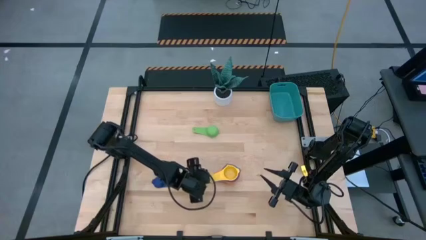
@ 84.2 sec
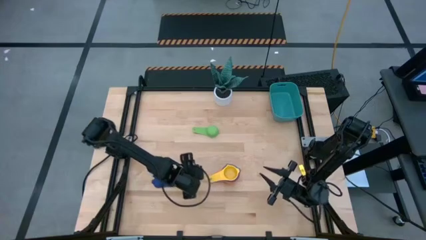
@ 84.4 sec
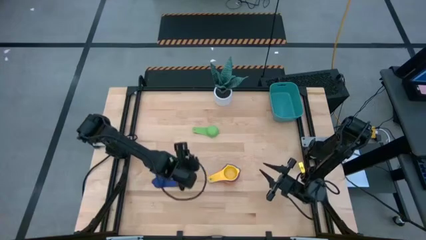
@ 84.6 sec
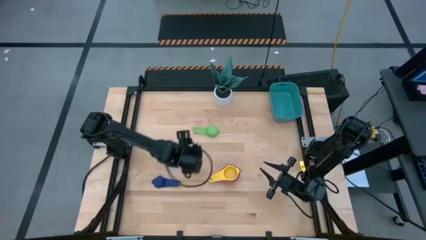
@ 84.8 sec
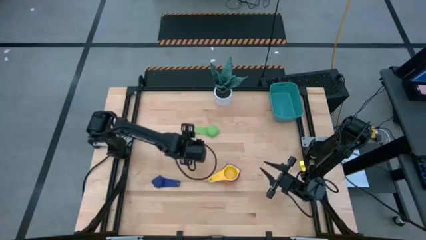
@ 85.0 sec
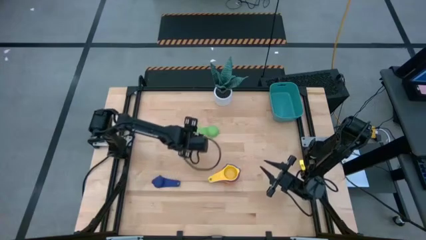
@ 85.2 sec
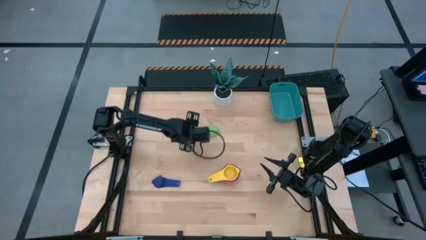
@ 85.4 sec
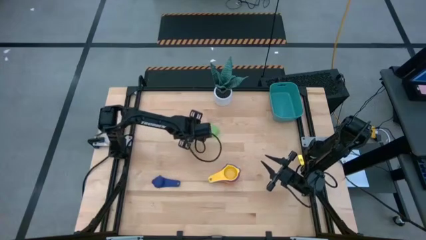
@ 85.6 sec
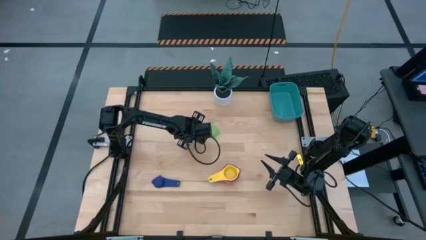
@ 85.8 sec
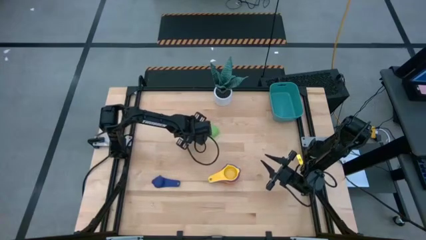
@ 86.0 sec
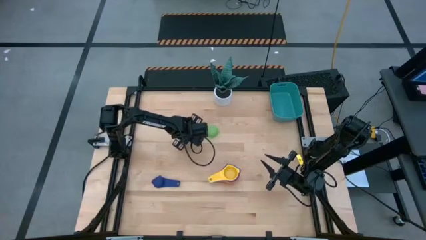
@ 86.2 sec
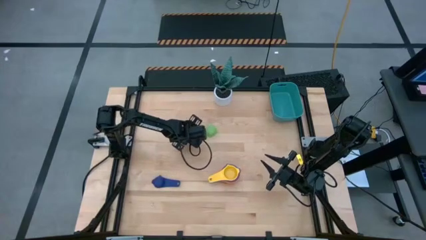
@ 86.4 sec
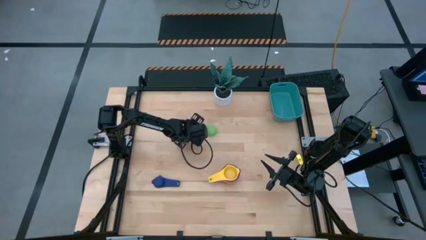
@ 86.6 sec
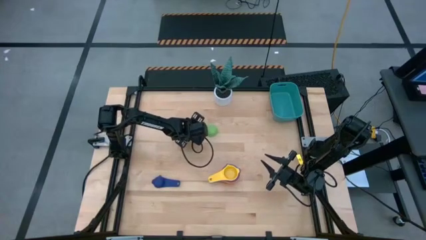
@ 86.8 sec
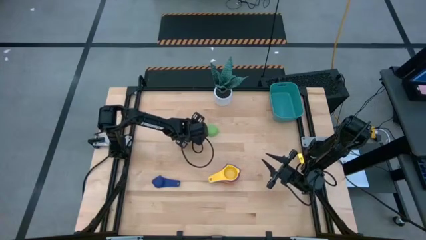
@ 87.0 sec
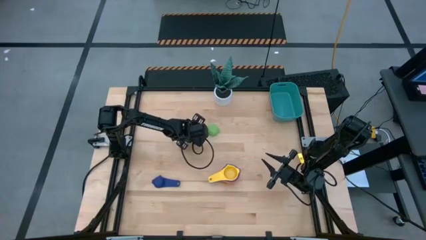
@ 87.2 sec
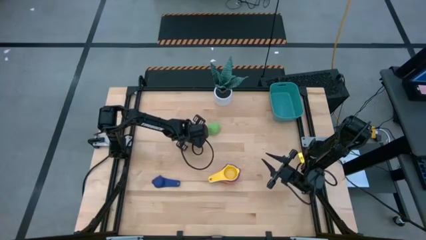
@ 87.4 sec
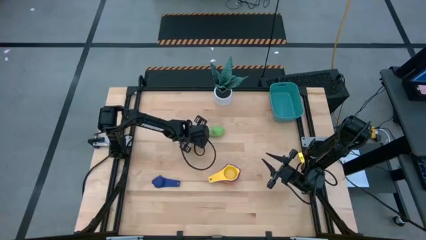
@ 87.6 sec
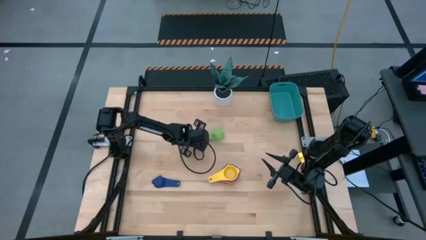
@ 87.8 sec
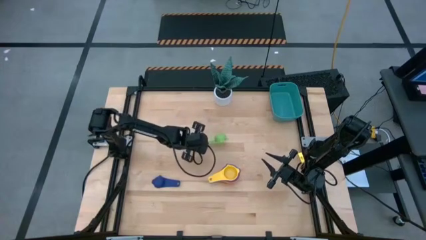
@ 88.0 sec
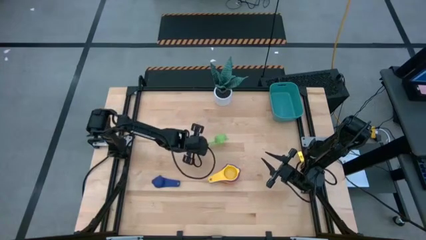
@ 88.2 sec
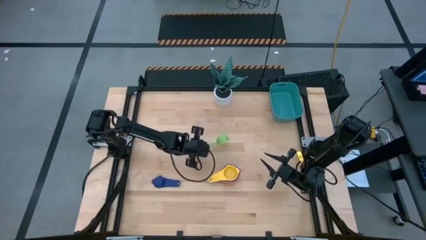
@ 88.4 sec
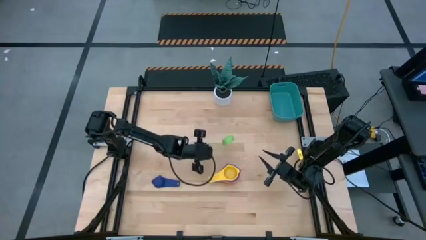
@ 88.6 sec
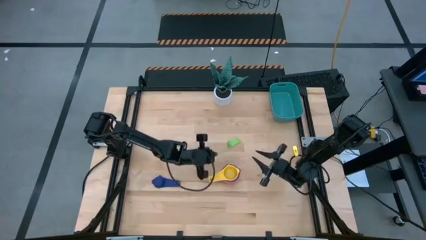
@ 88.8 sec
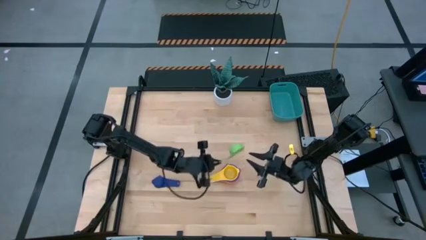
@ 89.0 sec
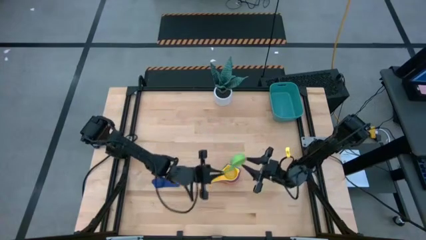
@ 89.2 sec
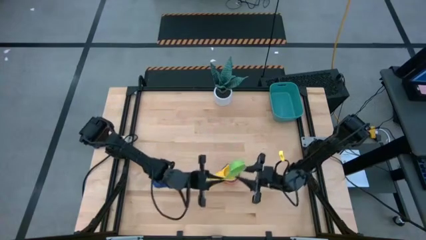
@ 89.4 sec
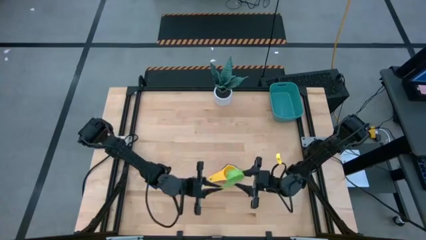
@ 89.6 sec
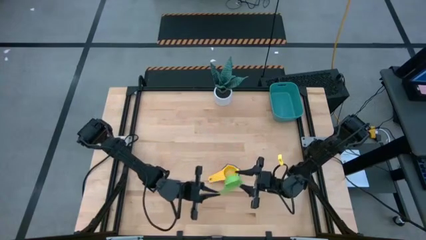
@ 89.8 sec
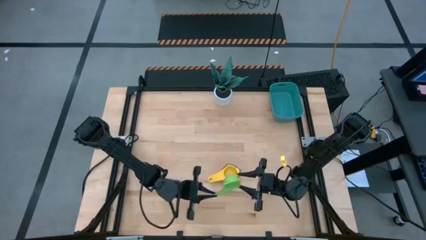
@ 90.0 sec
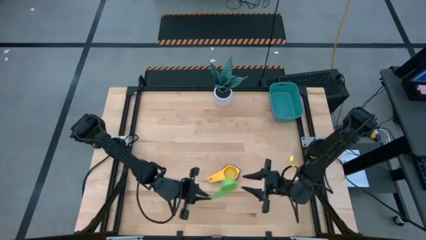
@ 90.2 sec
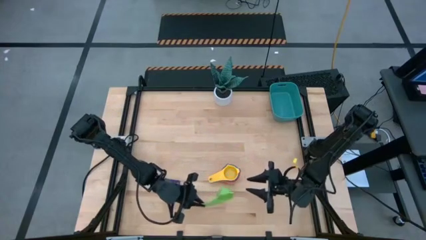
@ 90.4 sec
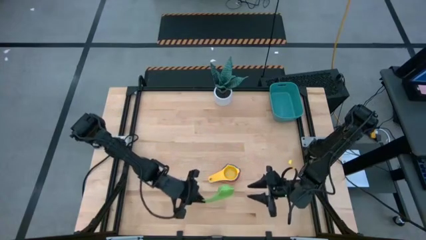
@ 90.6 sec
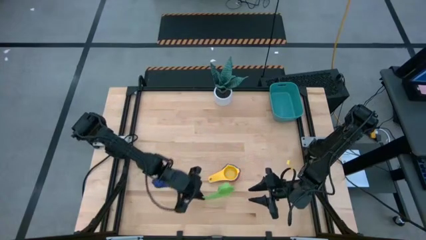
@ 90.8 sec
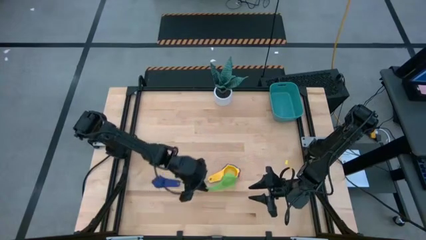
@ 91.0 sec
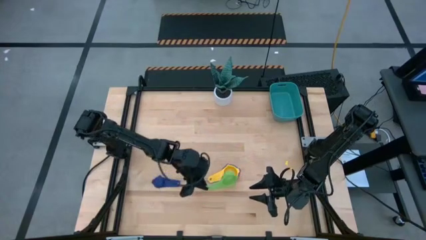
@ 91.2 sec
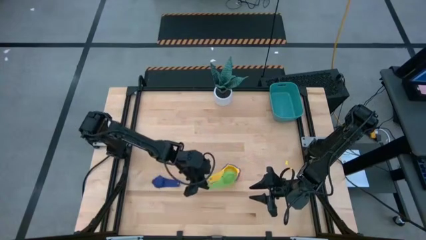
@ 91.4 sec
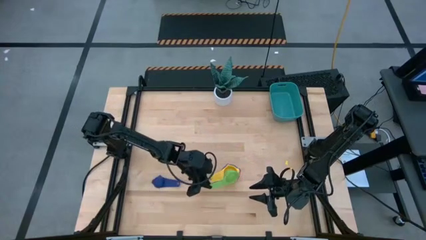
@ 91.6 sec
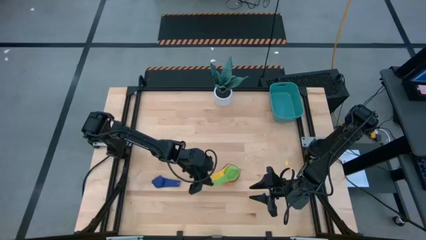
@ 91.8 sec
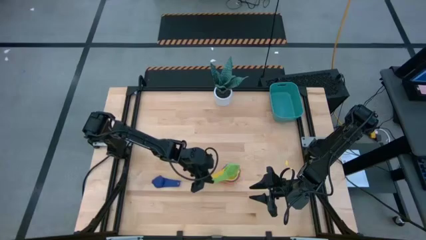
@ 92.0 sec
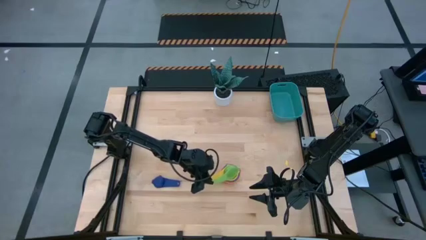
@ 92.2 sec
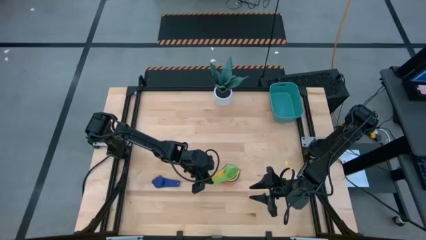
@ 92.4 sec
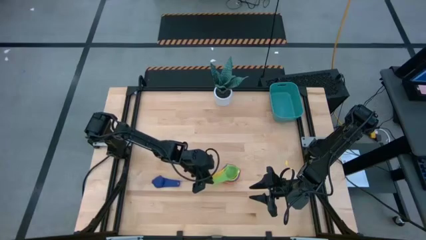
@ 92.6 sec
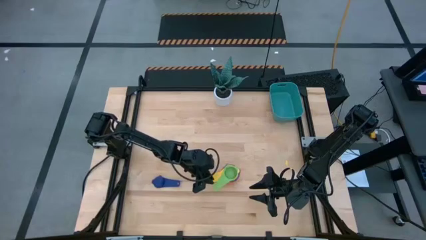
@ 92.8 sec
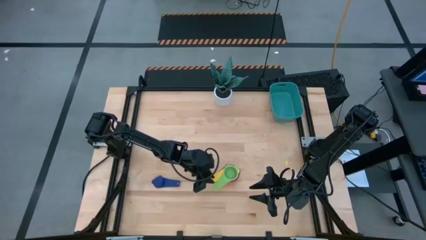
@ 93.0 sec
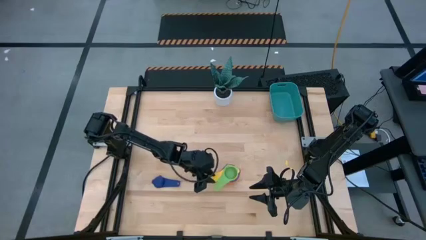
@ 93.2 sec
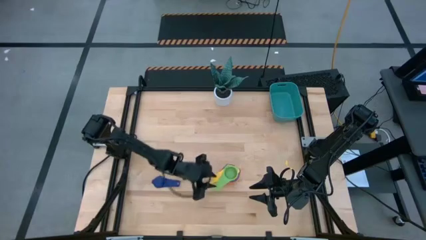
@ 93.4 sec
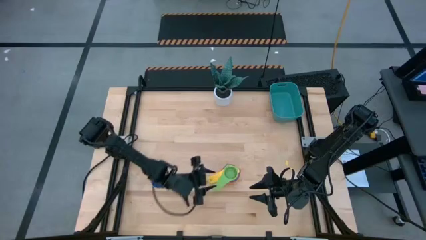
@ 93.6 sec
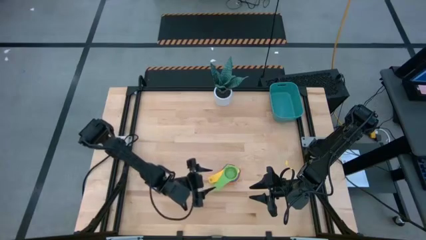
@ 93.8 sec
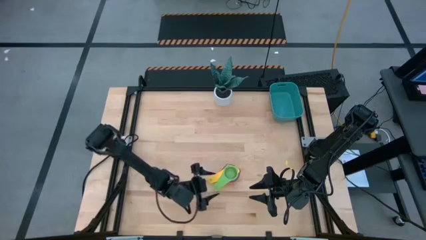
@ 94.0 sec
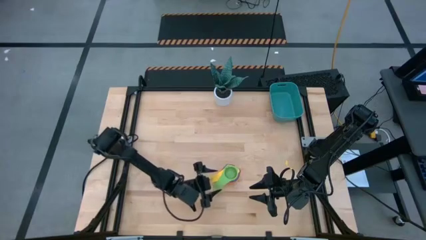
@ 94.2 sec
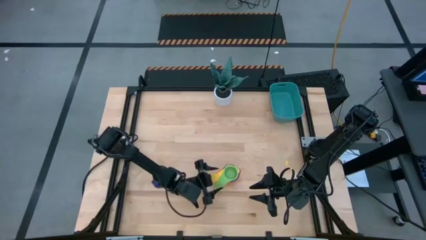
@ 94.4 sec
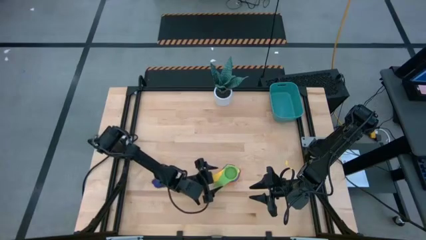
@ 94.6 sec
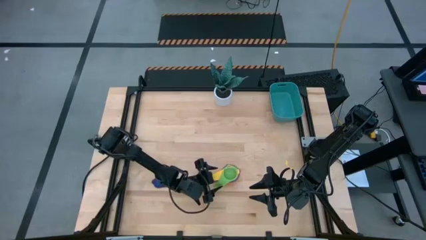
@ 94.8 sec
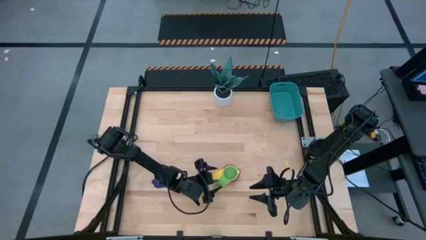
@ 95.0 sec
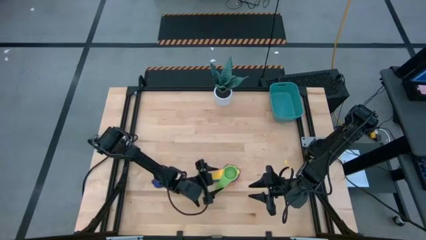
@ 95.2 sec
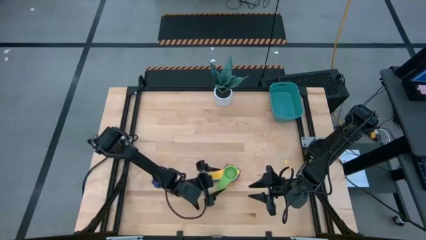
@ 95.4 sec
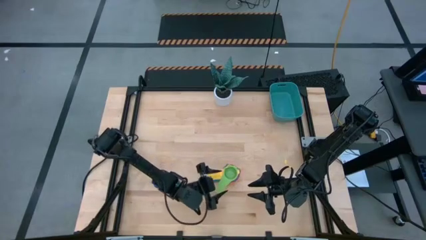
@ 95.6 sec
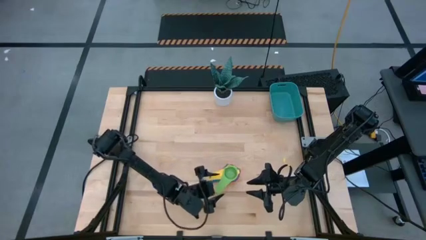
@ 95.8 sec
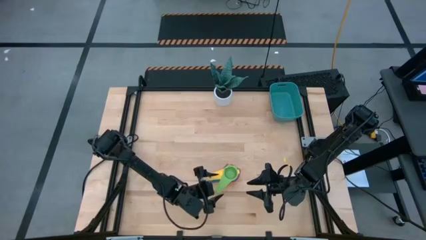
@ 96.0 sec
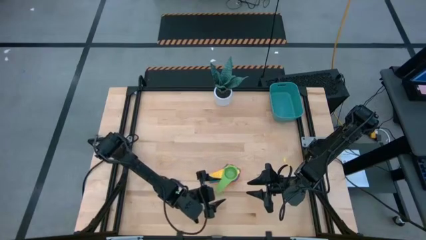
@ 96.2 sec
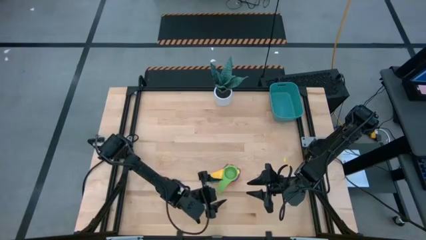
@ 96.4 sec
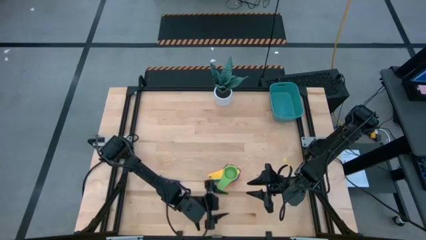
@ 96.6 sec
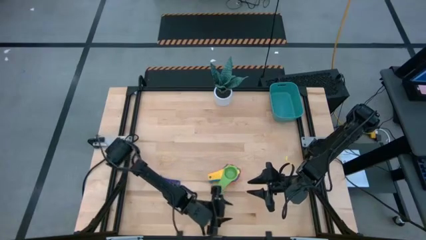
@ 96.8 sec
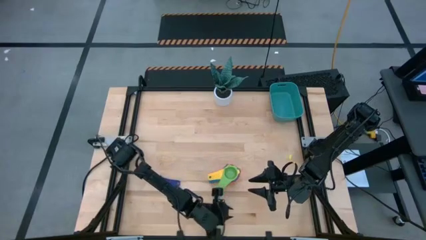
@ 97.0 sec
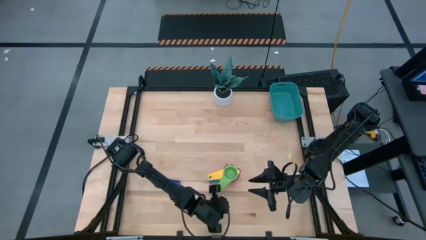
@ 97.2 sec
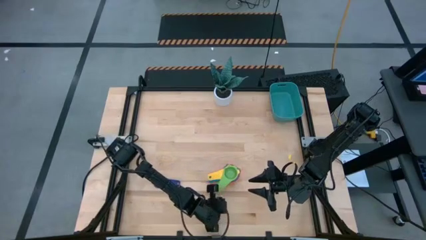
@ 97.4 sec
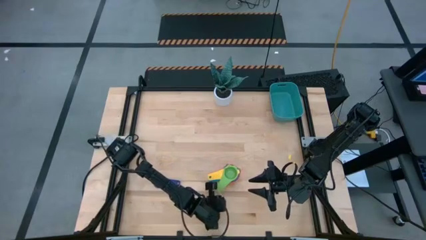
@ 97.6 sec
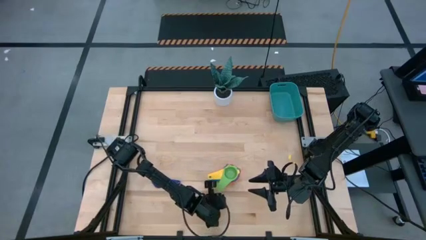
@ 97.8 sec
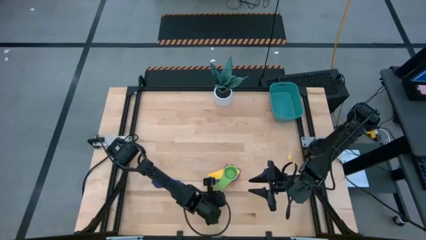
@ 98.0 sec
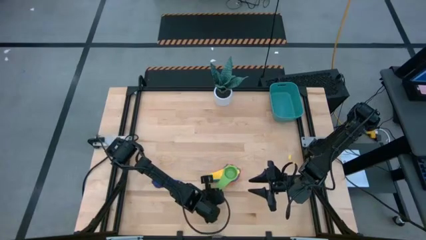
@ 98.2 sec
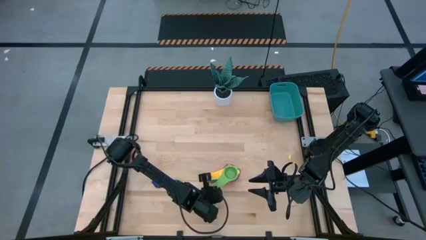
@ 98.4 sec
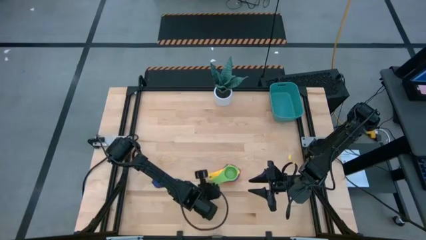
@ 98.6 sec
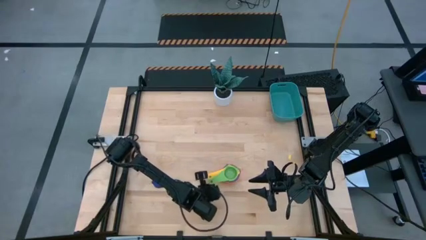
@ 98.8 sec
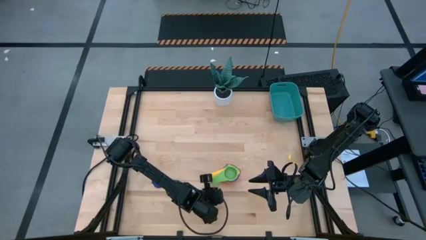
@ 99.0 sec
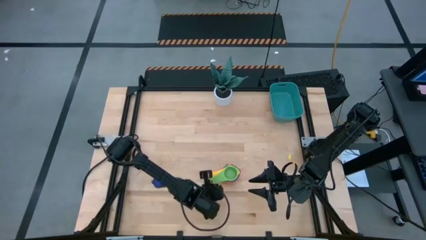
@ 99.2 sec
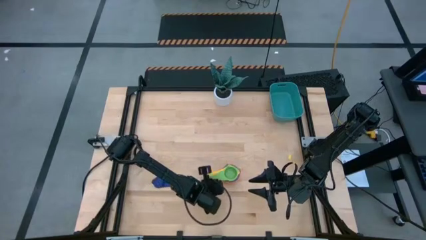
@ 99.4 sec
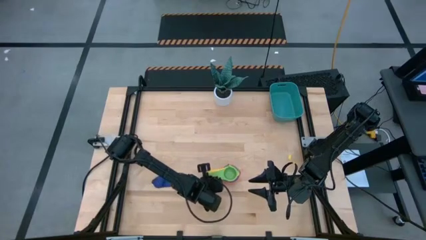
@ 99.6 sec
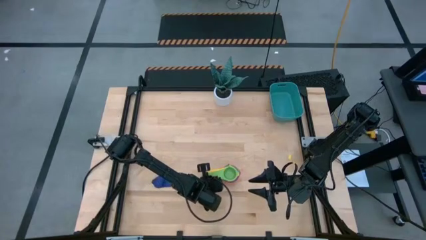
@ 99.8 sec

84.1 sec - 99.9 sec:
Task: Nest measuring cups in basket
Stack the green measuring cup on top of the yellow measuring cup
